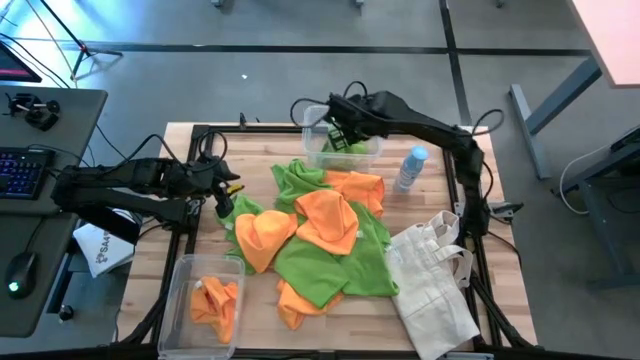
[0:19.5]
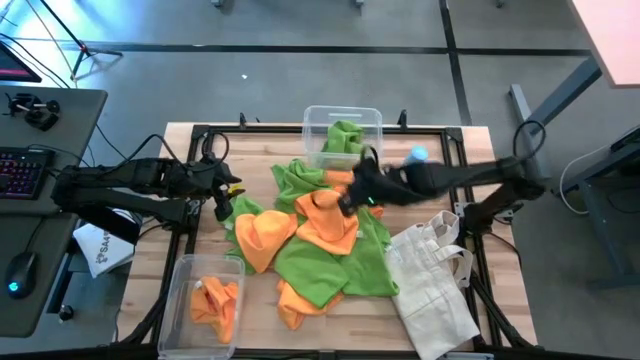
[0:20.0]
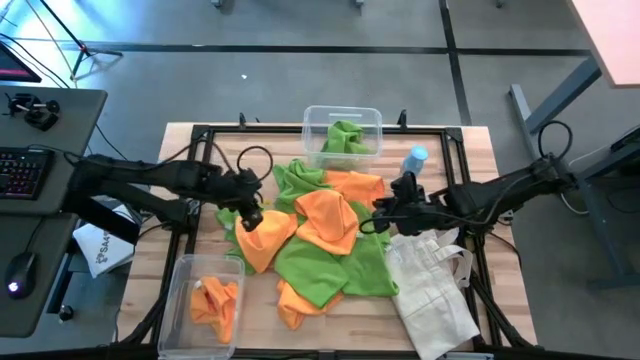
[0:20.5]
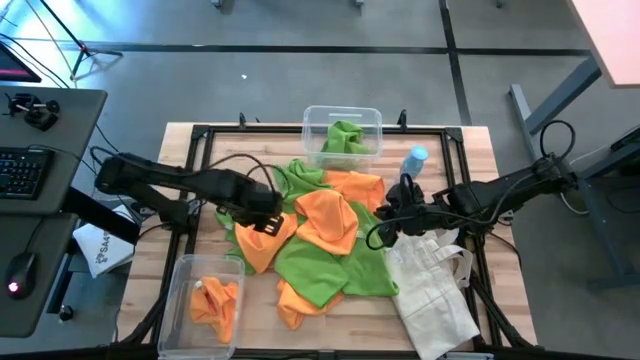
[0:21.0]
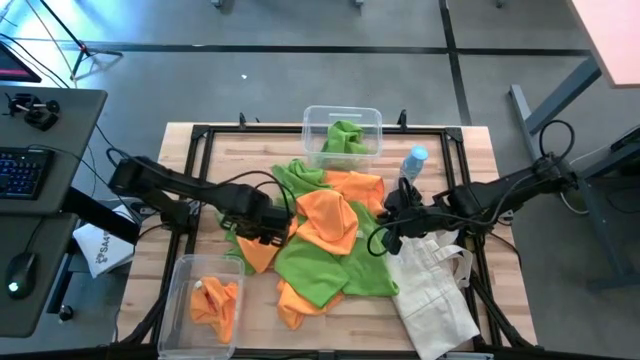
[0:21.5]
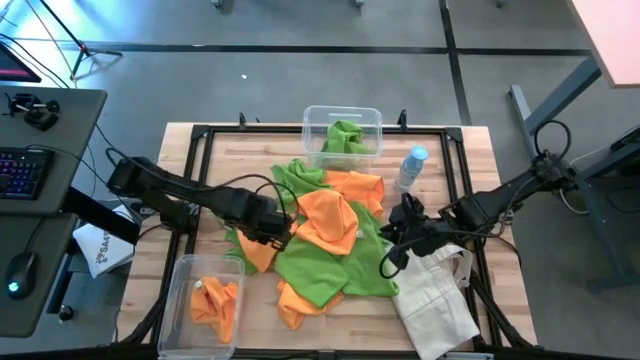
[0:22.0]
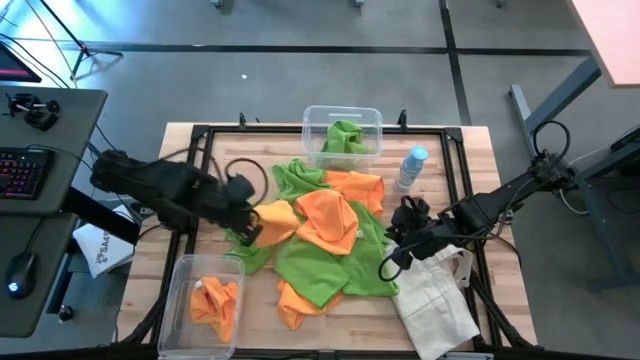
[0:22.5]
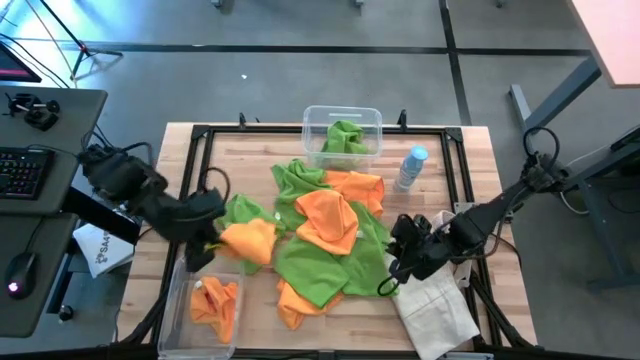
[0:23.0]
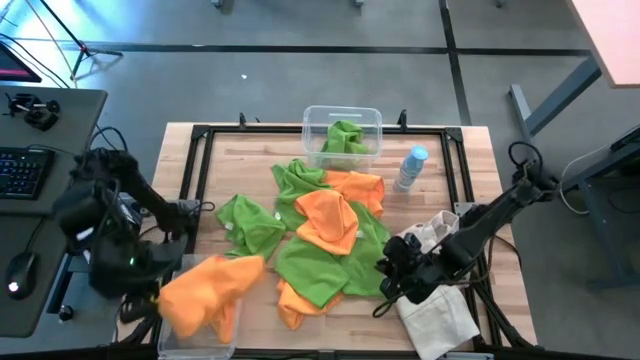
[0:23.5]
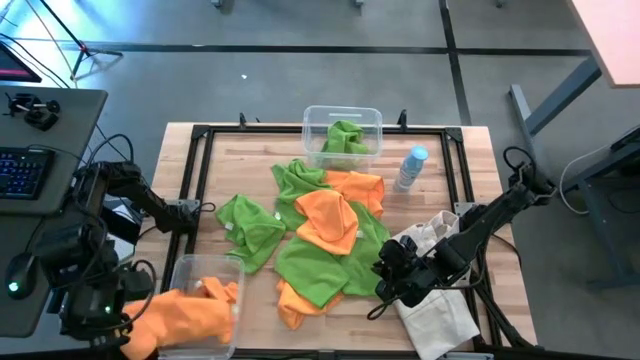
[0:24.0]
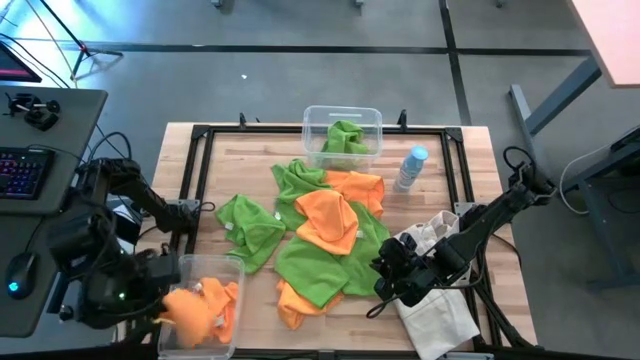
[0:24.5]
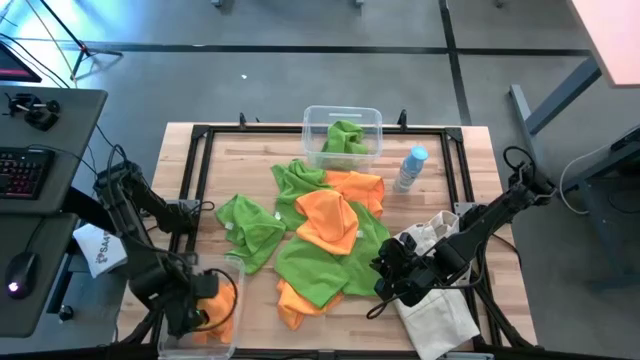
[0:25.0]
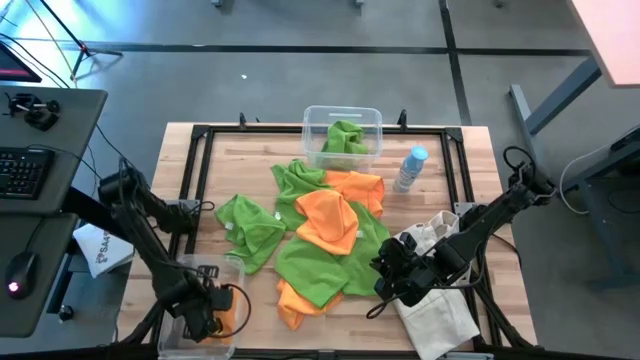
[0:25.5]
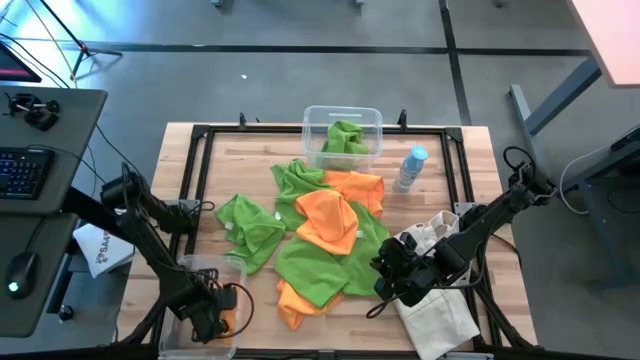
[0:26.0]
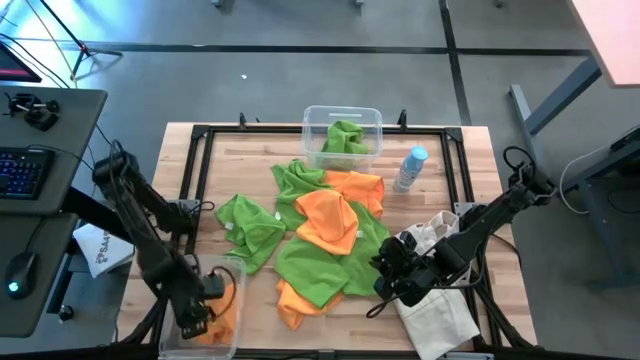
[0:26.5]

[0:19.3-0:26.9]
Task: Sort microfiber towel by color & place in baskets
Put the orange microfiber towel into the bottom transparent bin

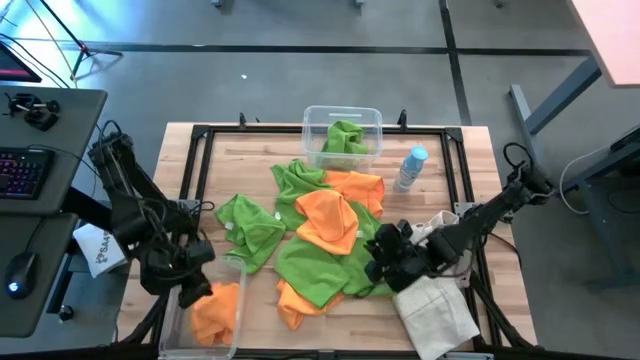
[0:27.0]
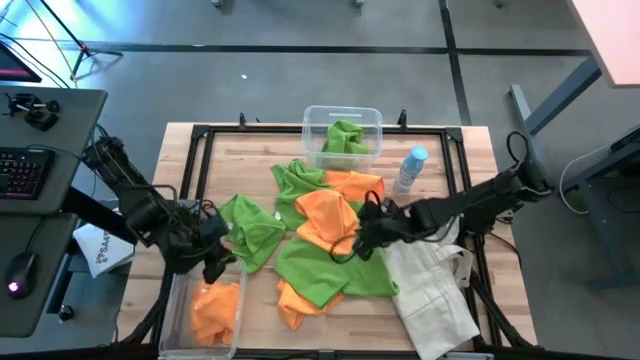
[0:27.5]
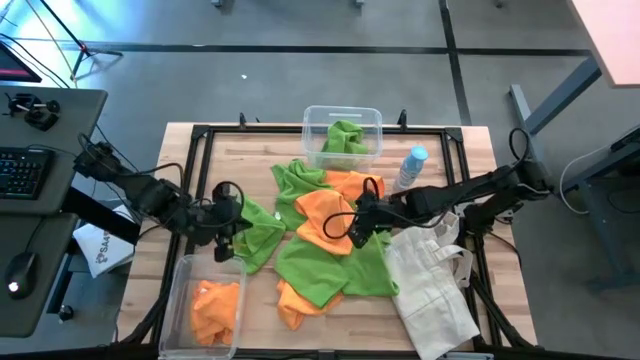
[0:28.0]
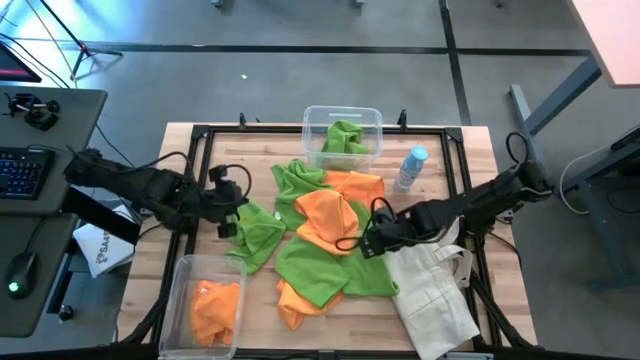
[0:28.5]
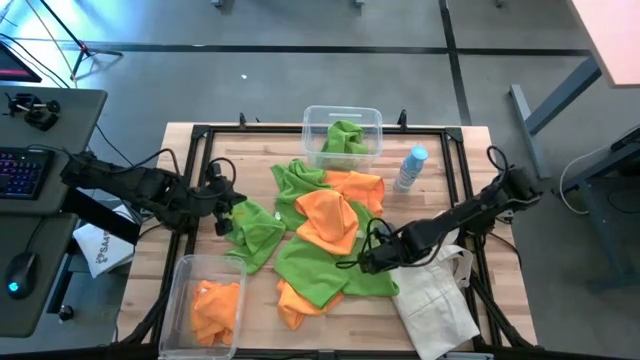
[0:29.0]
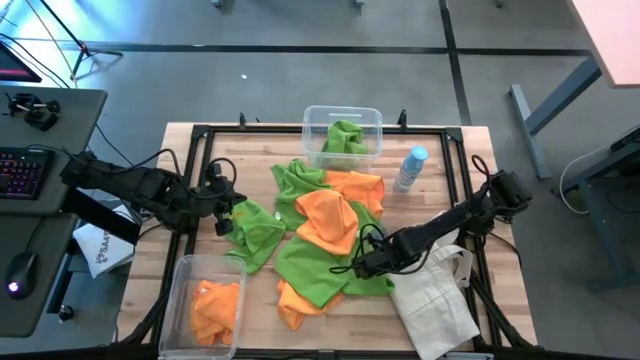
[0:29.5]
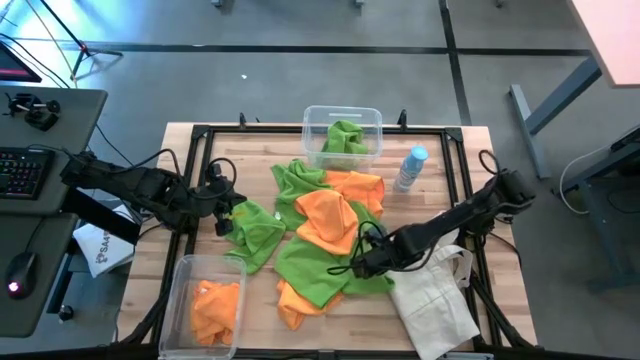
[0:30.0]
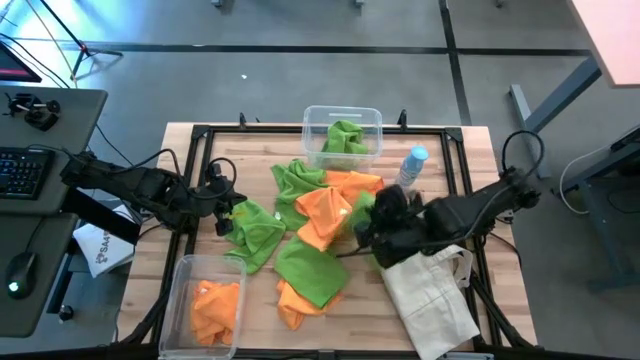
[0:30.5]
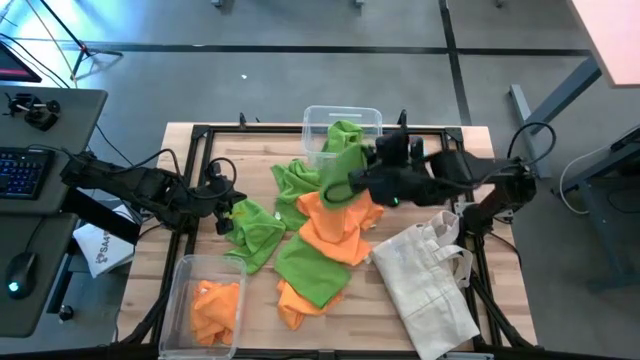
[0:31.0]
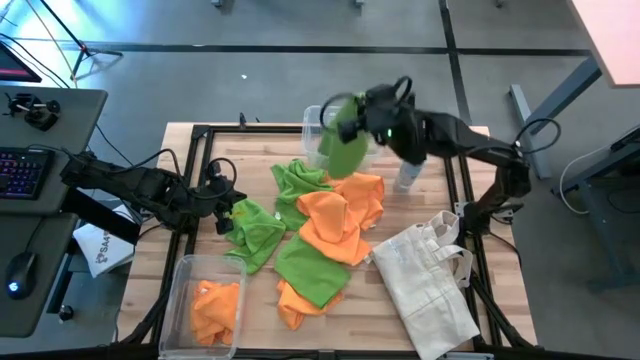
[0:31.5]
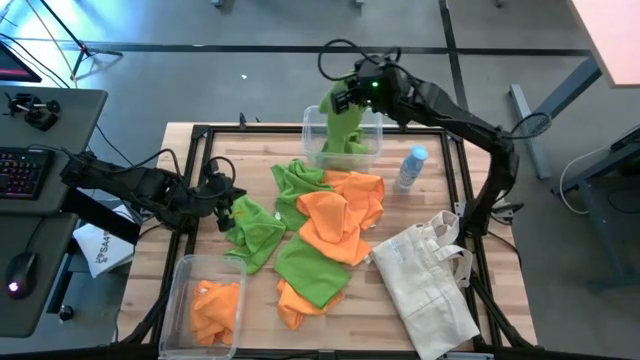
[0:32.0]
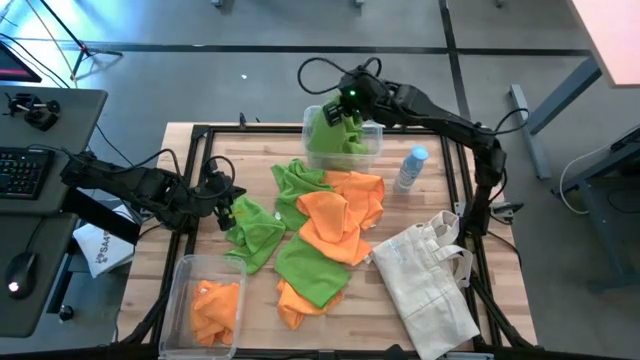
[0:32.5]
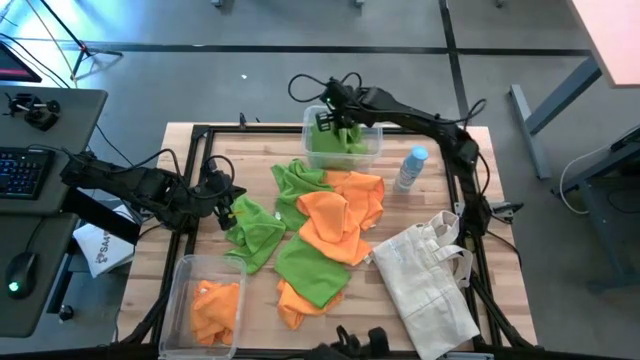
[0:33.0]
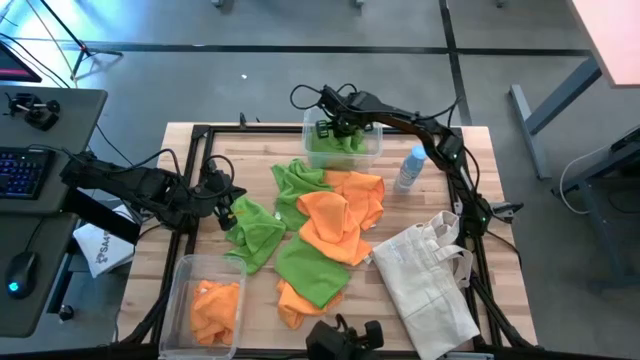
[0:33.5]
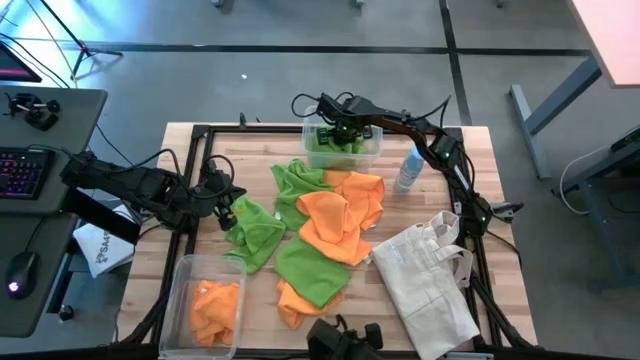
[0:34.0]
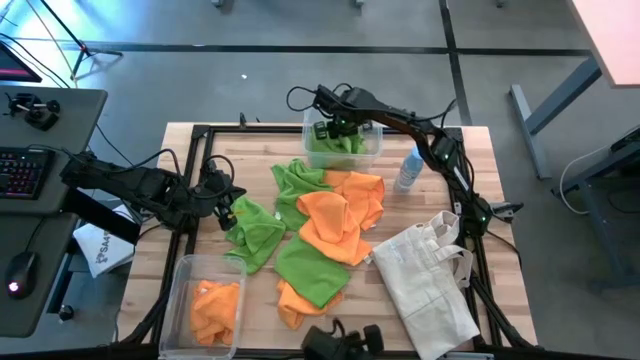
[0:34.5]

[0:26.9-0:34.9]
Put the green microfiber towel into the top transparent bin

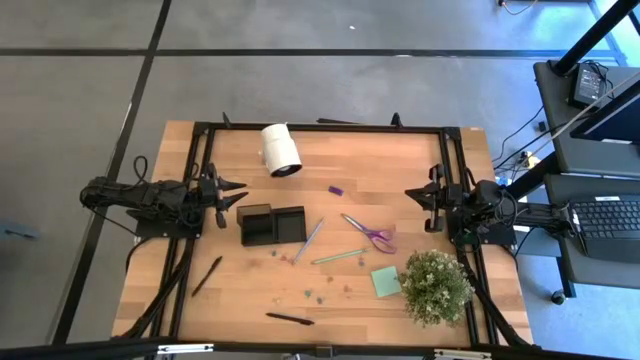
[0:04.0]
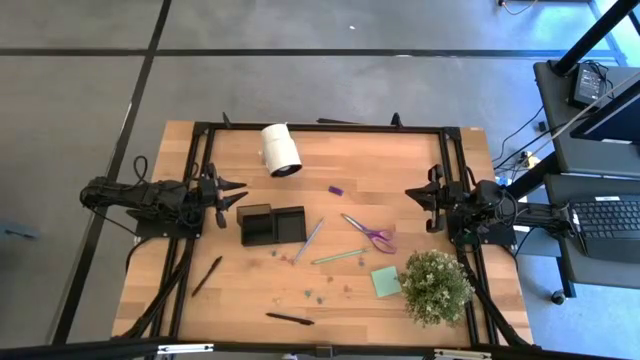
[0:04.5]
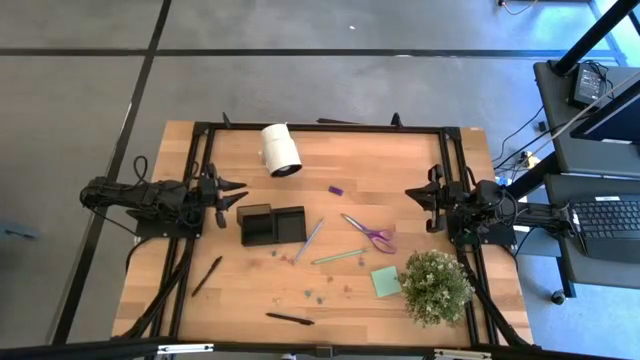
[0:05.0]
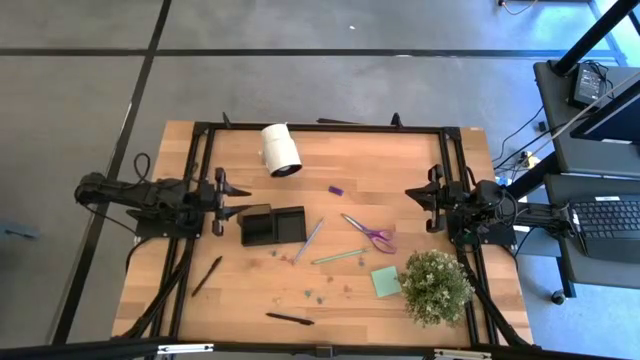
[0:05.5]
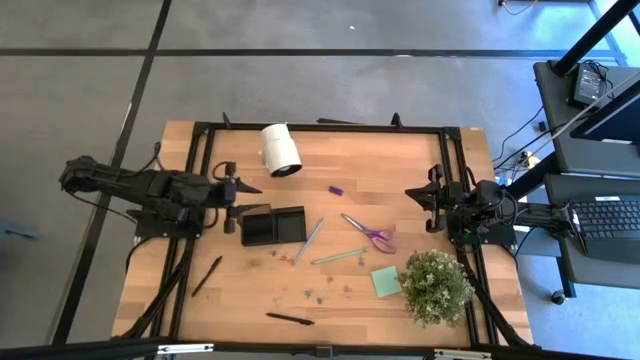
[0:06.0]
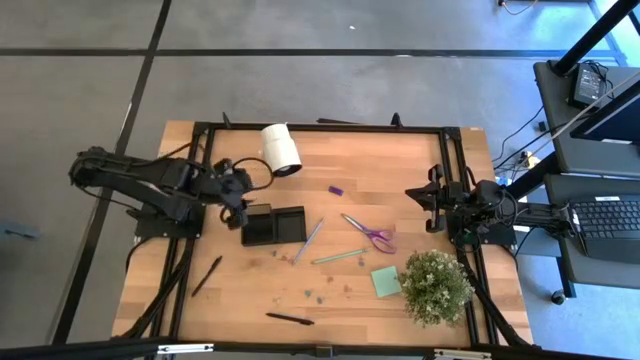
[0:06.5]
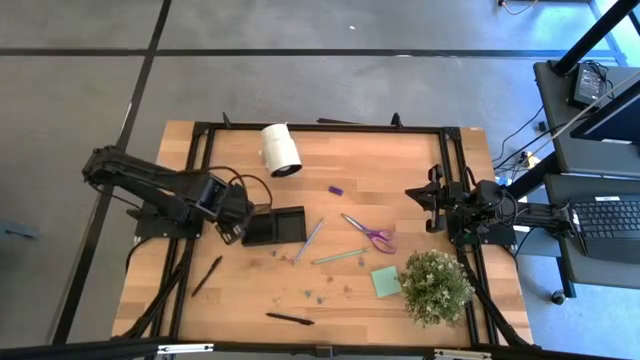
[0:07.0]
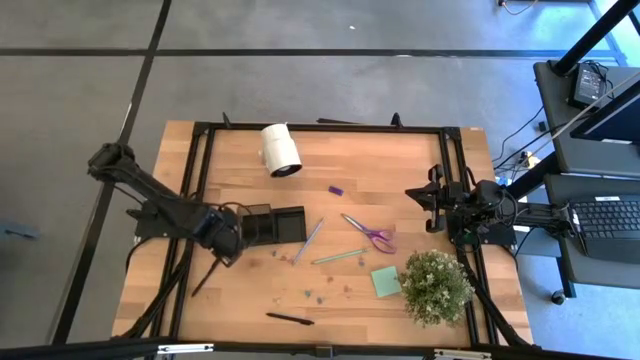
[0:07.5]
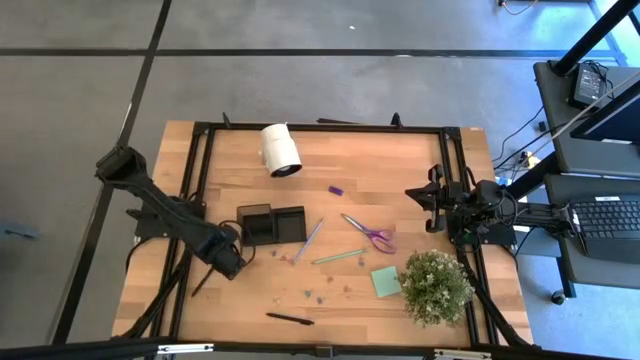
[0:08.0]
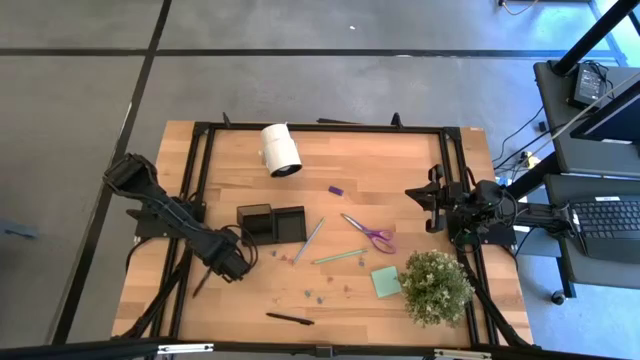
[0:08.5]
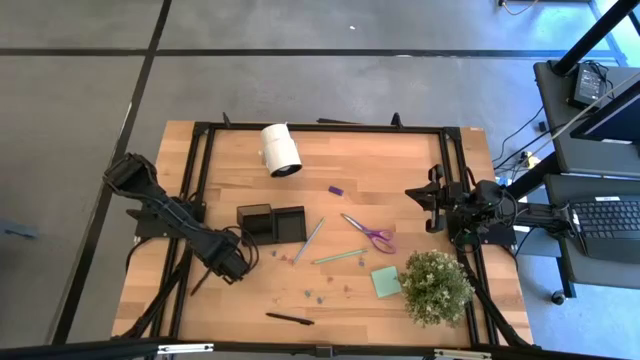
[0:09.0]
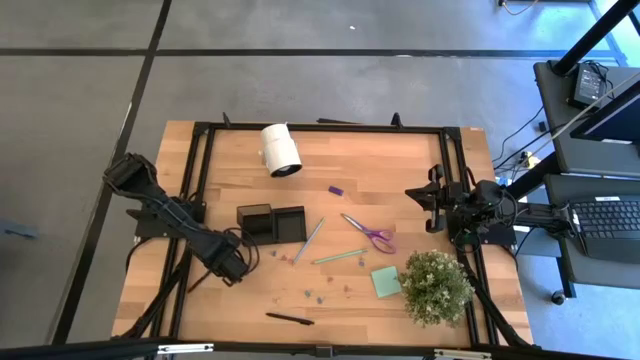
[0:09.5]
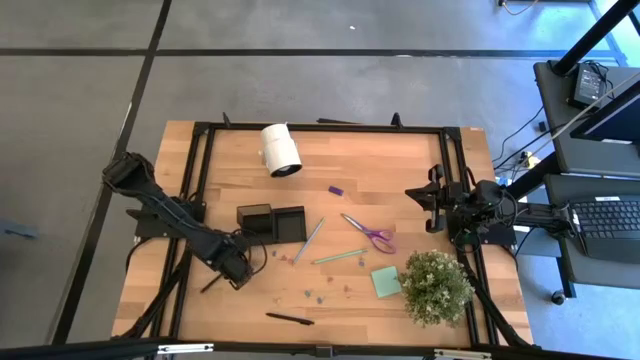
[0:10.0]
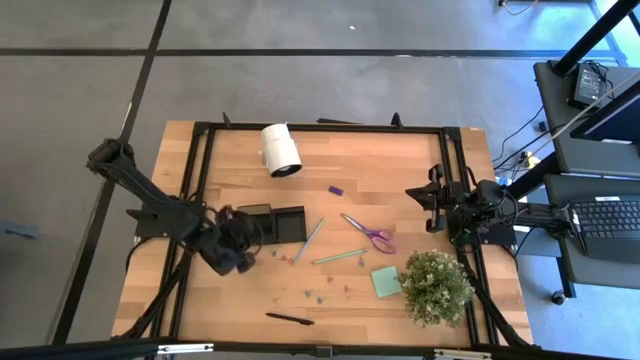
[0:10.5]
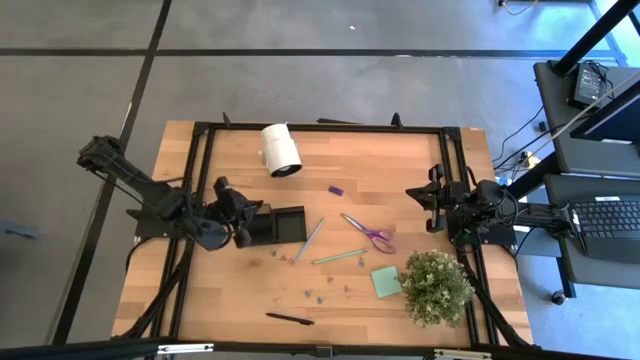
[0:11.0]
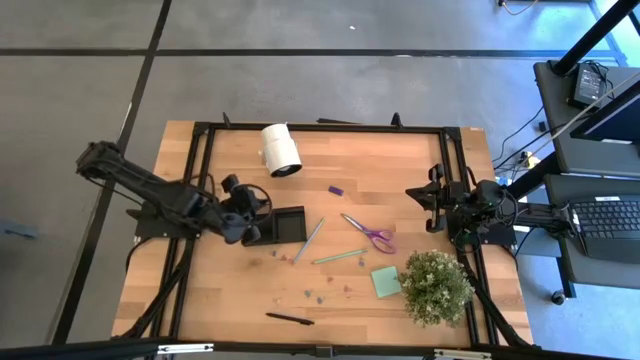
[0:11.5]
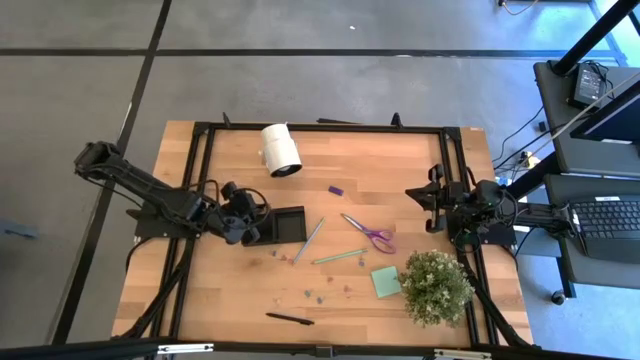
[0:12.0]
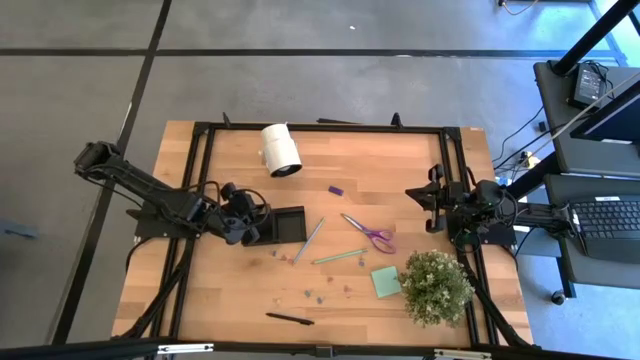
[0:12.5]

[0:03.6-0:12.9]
Task: Pick and place office supplies into organizer
Put the black pen into the black desk organizer
